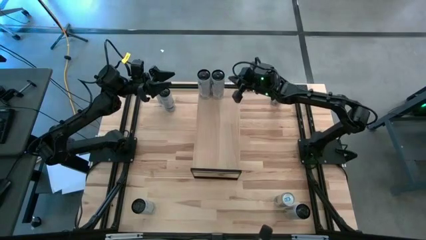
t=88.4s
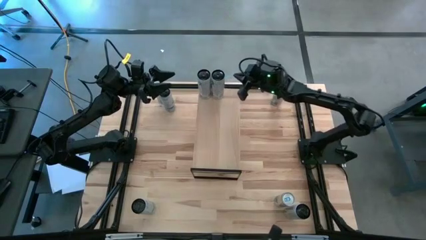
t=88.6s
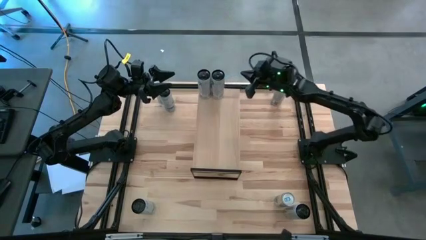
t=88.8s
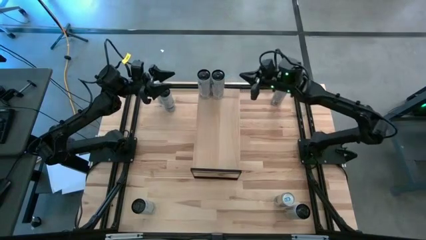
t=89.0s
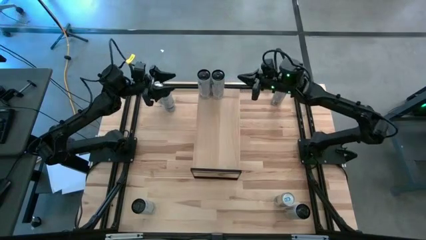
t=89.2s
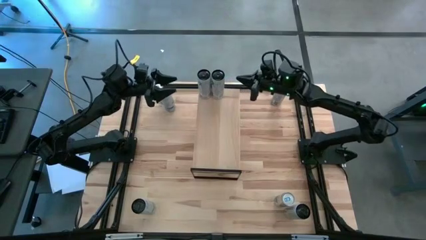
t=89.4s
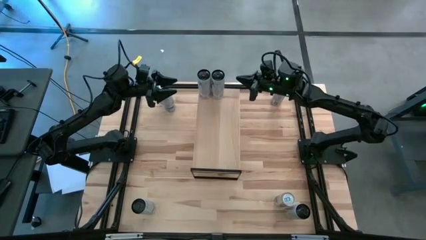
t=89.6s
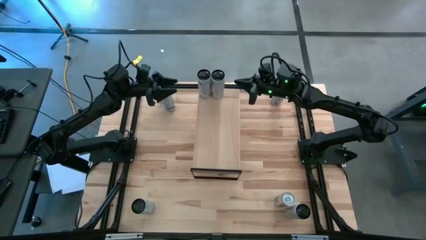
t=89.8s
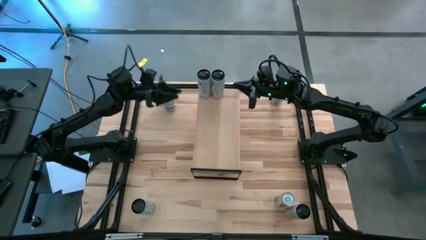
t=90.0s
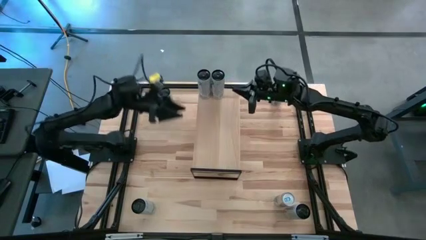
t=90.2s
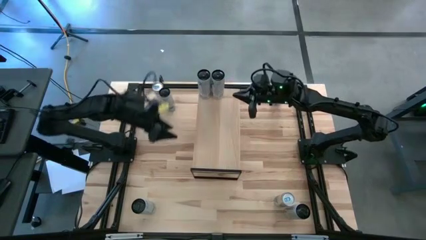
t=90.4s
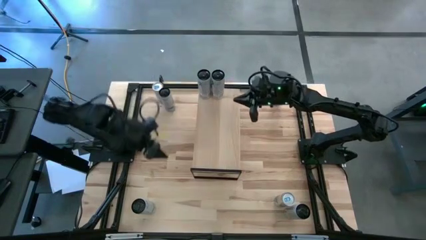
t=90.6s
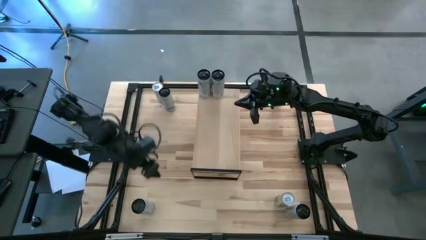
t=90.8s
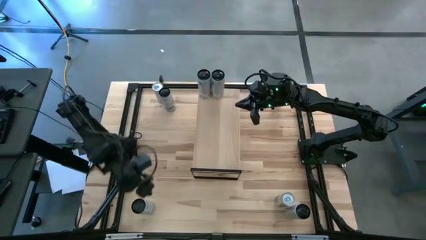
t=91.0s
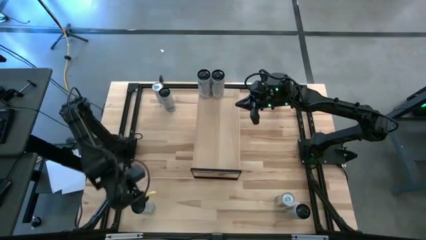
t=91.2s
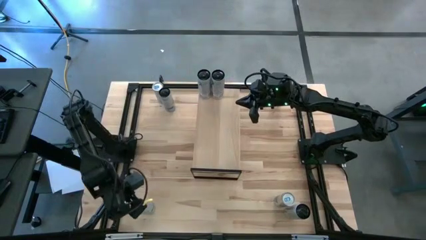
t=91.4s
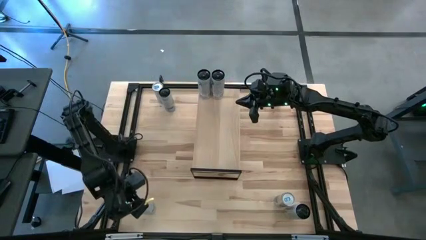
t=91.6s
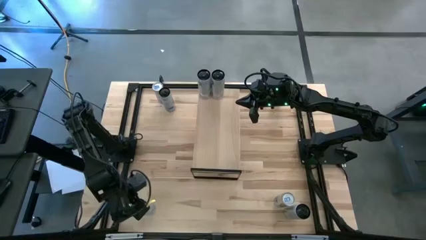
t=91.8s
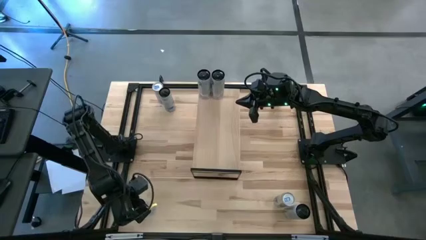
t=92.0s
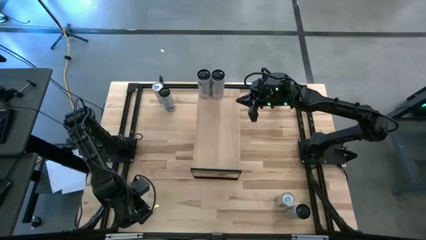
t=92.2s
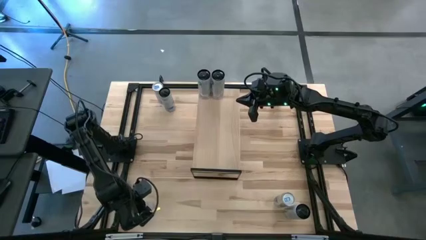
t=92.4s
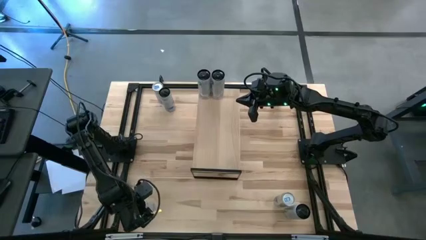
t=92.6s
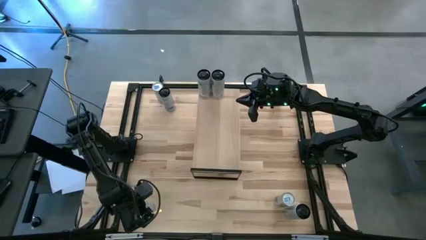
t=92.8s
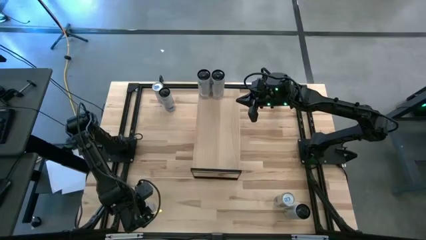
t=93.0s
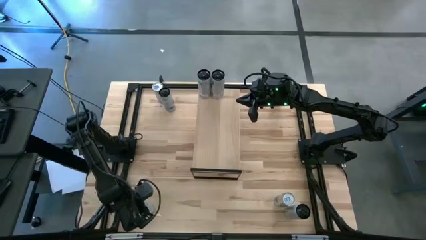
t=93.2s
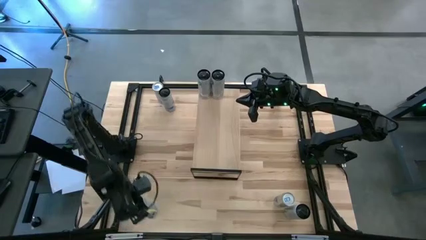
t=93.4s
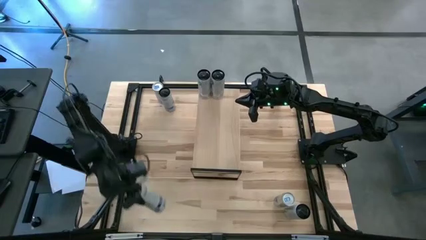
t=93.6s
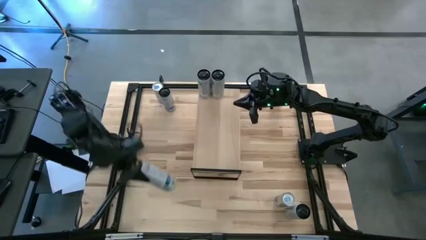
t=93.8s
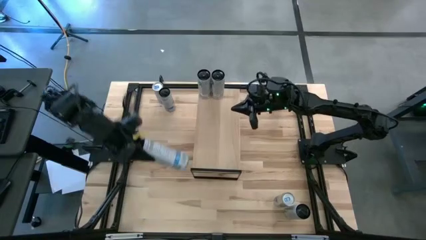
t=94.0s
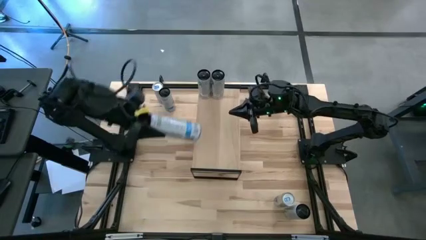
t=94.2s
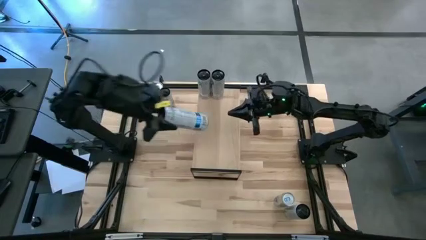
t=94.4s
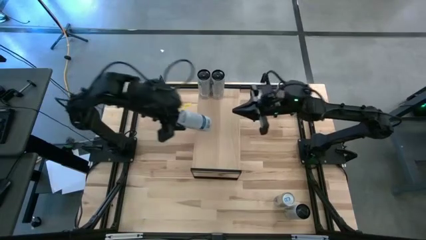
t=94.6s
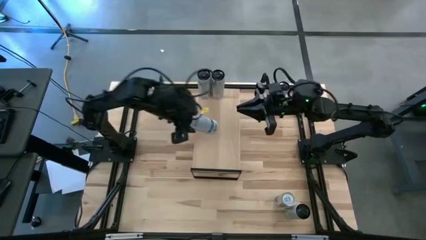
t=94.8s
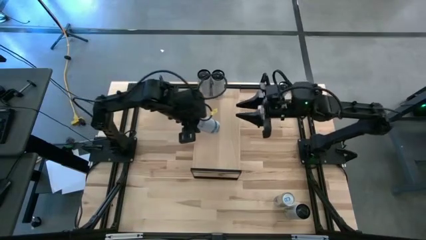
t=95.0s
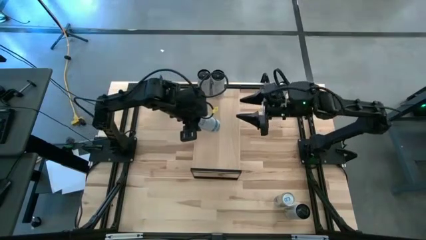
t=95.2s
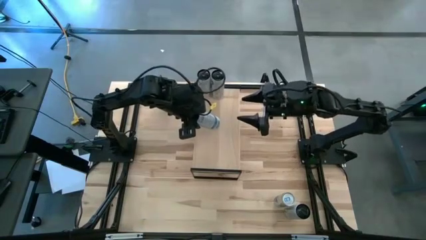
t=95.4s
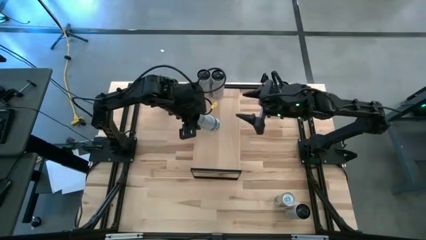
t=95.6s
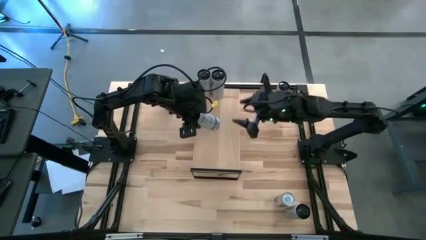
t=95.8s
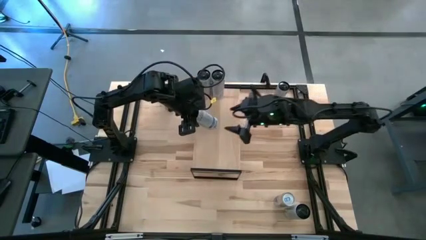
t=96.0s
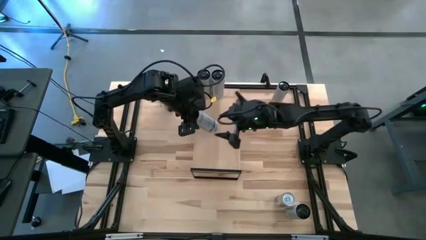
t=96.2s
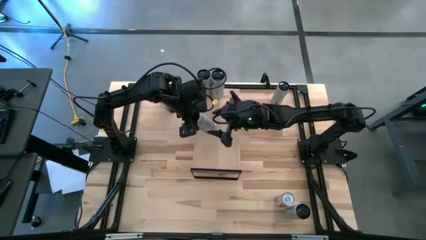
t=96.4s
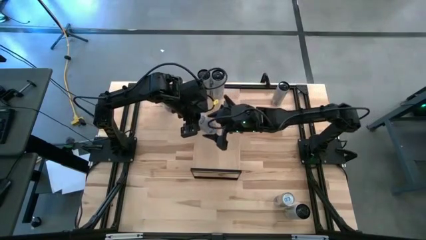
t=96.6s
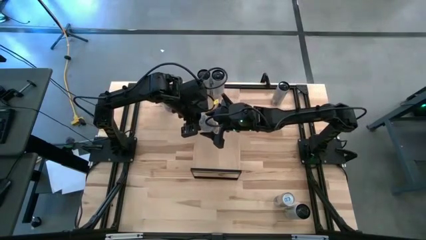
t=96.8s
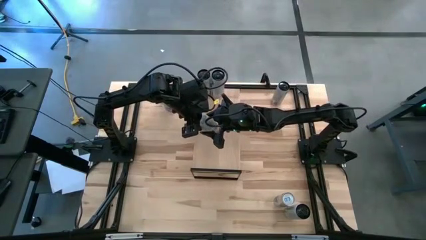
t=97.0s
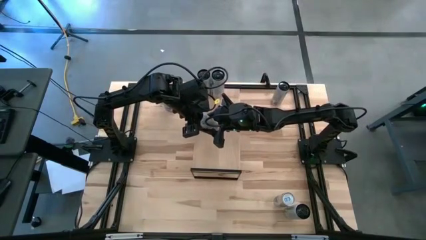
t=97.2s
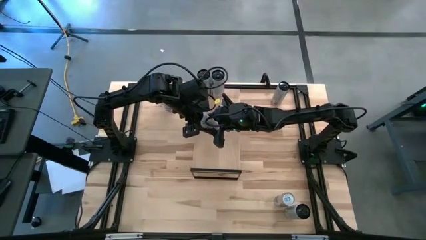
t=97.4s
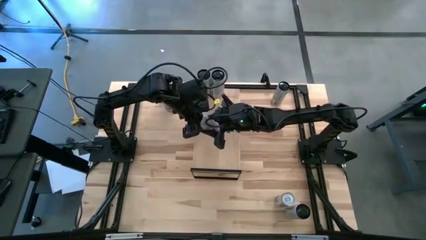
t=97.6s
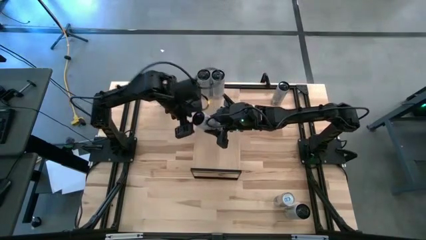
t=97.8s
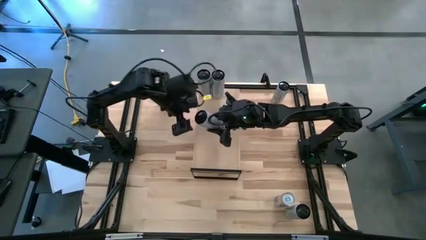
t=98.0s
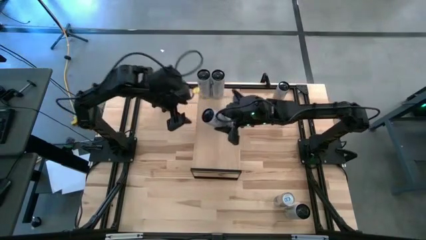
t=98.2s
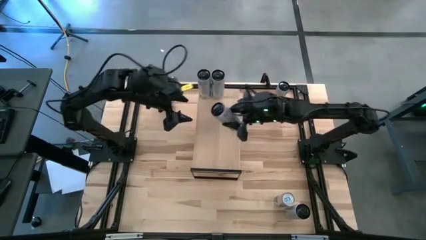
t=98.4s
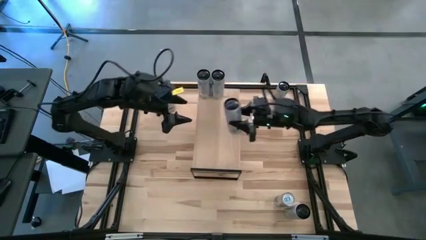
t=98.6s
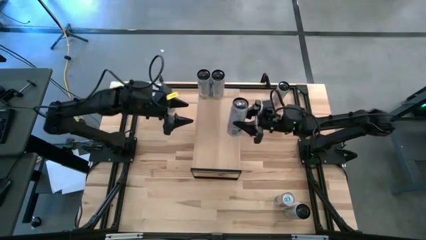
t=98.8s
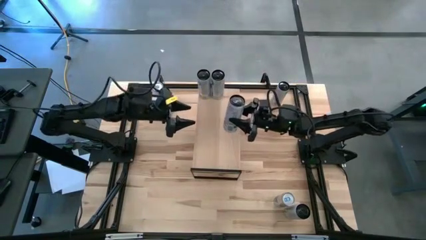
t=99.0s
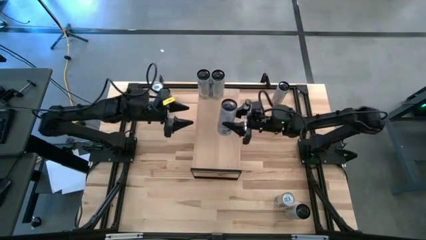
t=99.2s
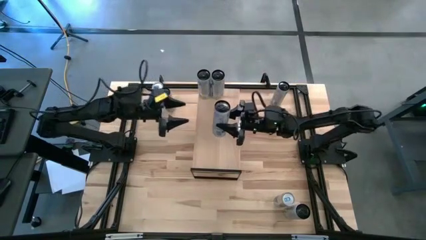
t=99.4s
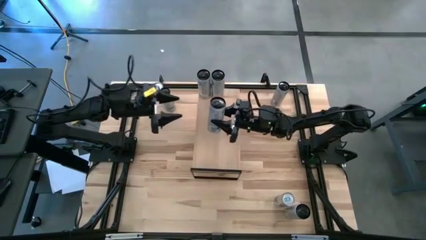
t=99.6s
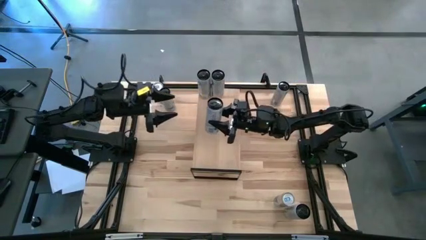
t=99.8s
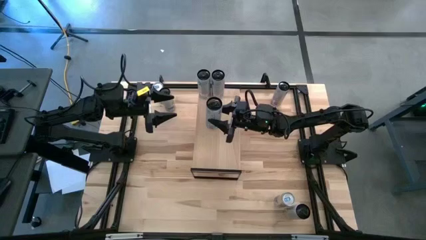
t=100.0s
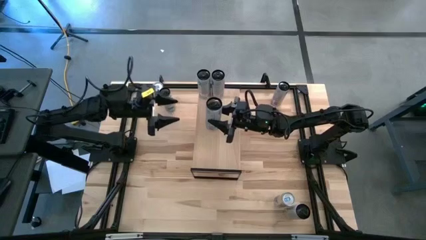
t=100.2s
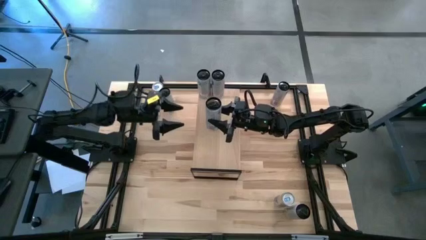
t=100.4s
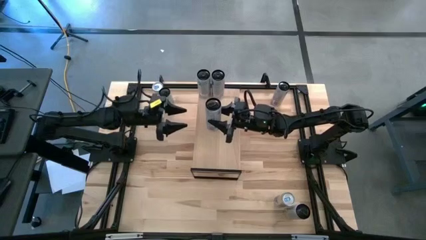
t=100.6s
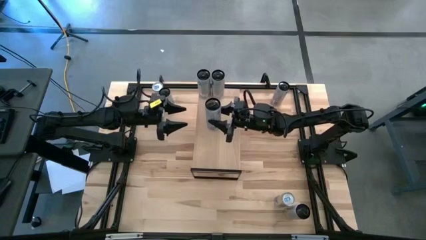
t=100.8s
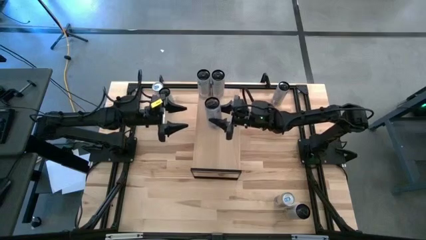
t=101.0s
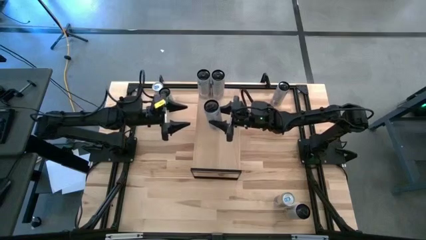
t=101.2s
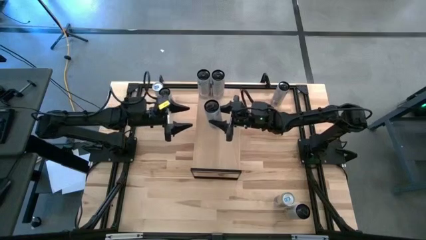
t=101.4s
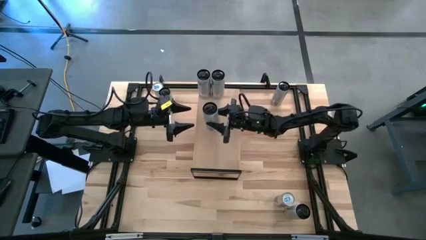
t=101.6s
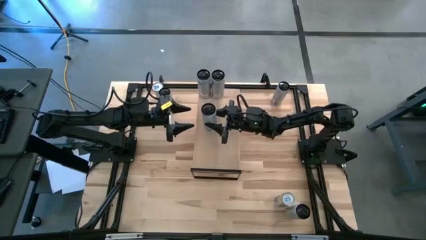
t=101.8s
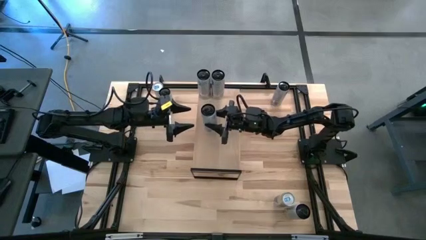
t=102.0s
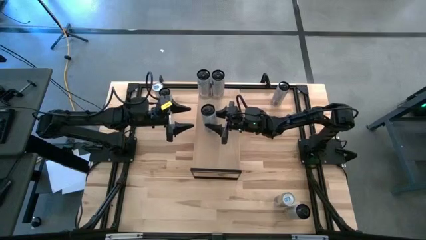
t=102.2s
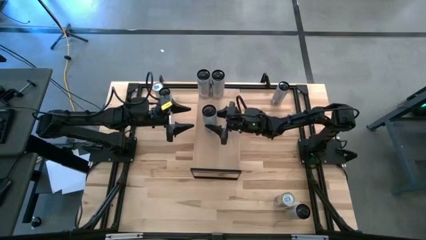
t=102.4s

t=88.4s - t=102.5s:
Task: Place canned beverage on shelf
Put the bottom white blue soda can on the shelf
